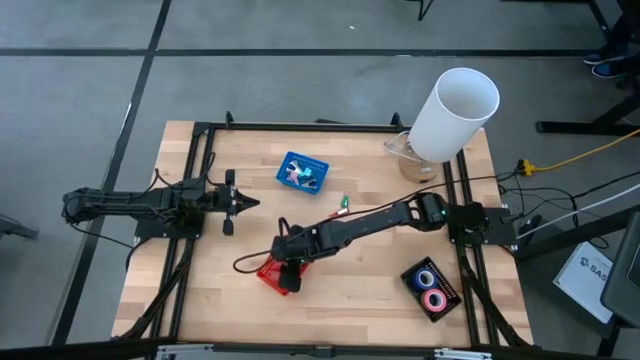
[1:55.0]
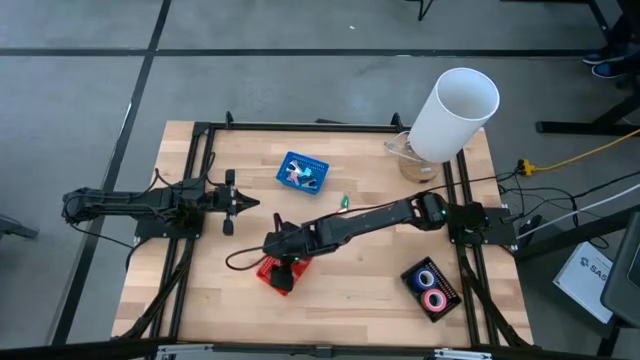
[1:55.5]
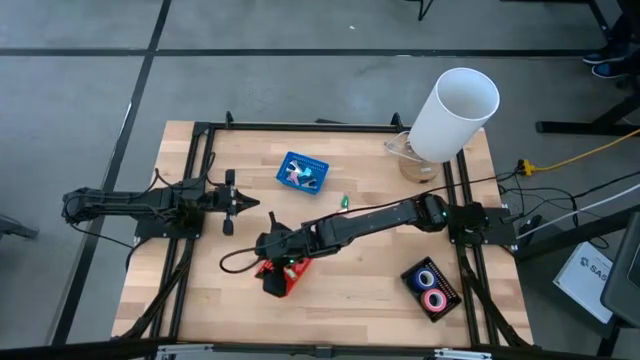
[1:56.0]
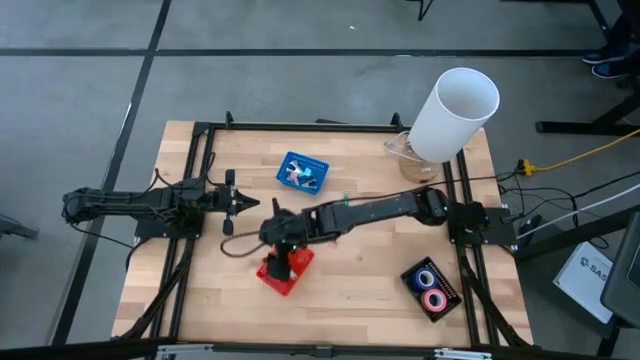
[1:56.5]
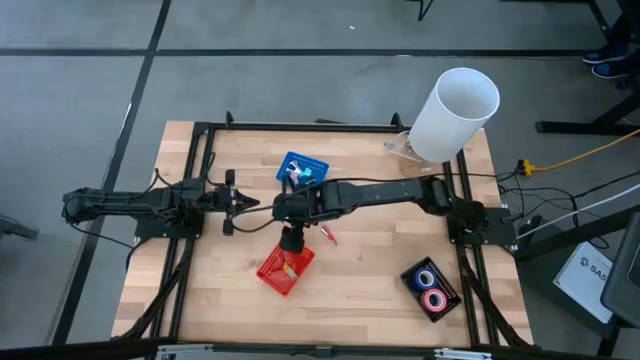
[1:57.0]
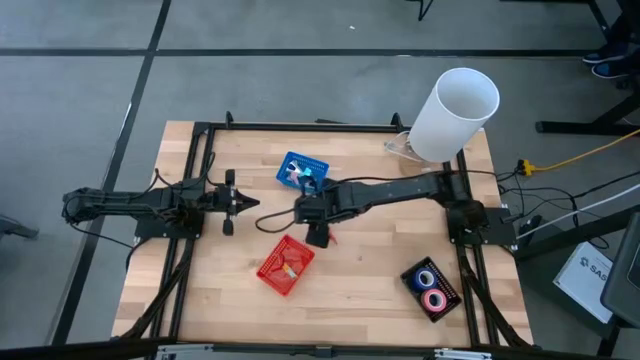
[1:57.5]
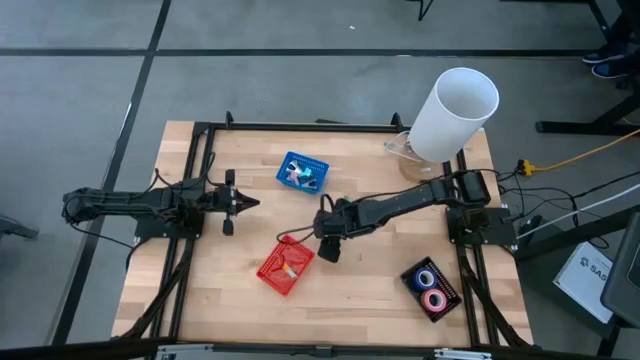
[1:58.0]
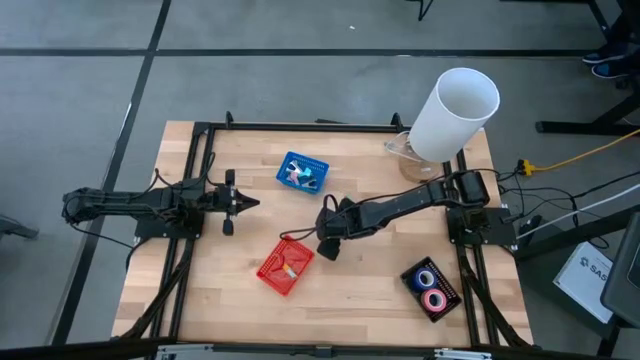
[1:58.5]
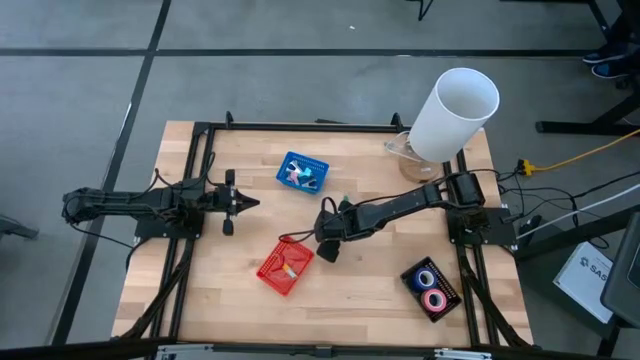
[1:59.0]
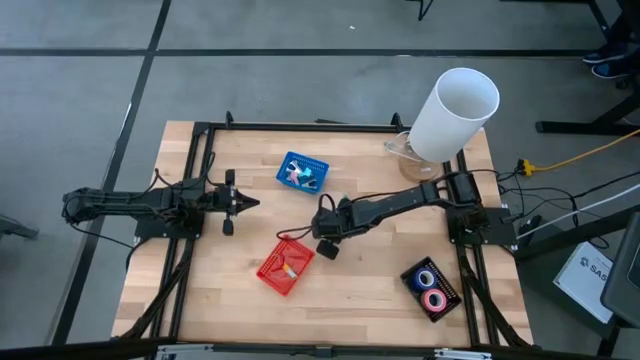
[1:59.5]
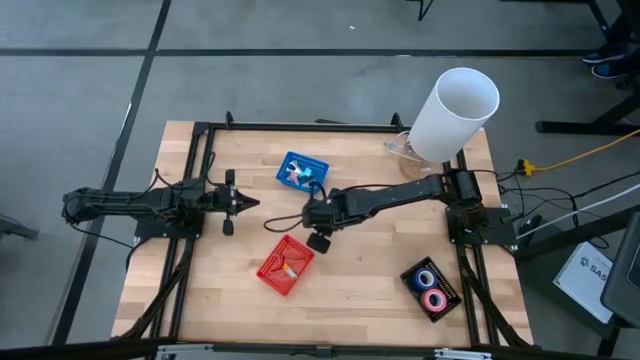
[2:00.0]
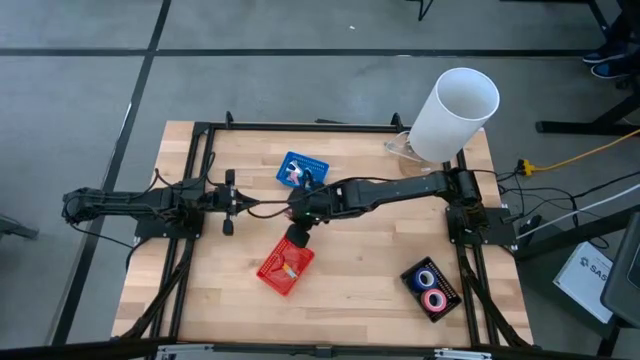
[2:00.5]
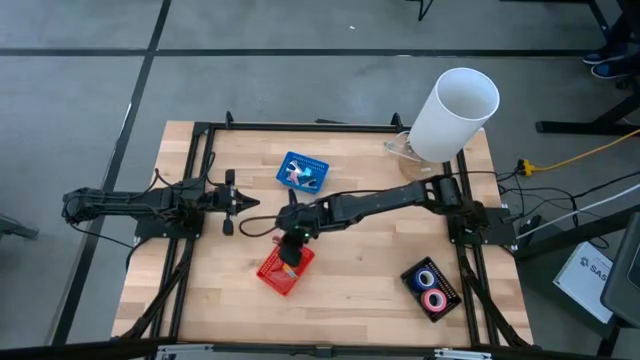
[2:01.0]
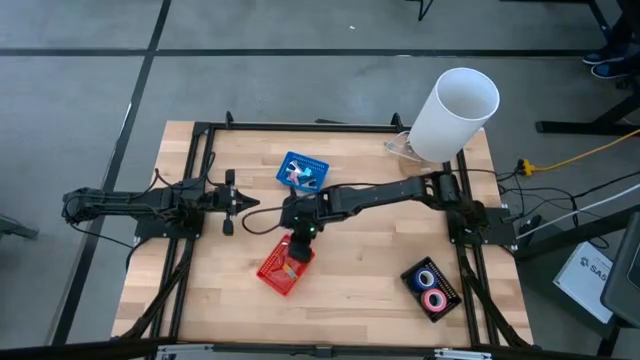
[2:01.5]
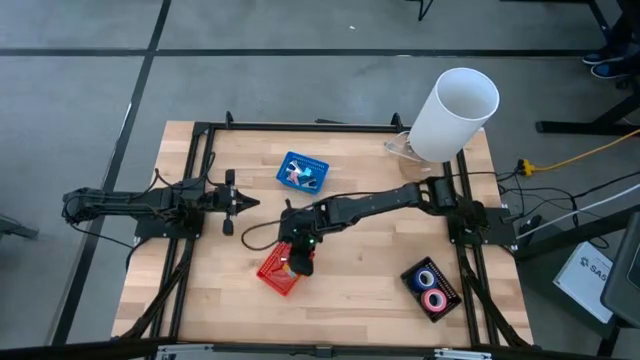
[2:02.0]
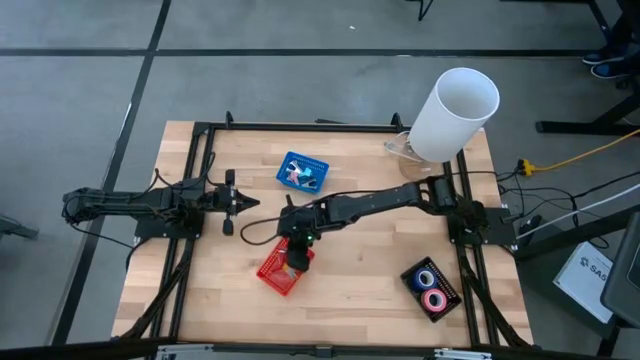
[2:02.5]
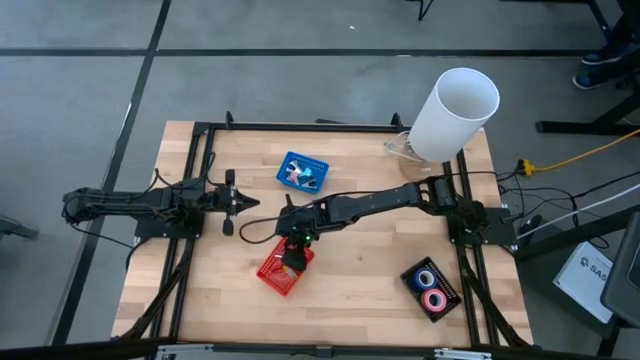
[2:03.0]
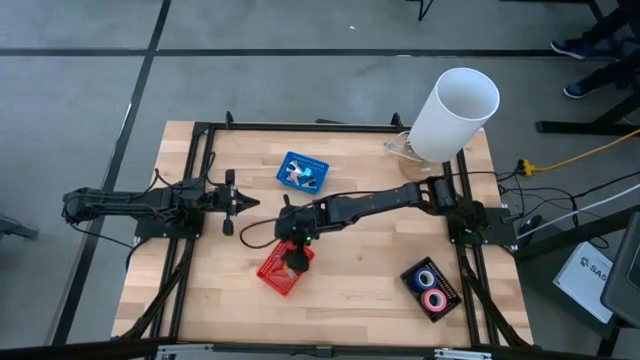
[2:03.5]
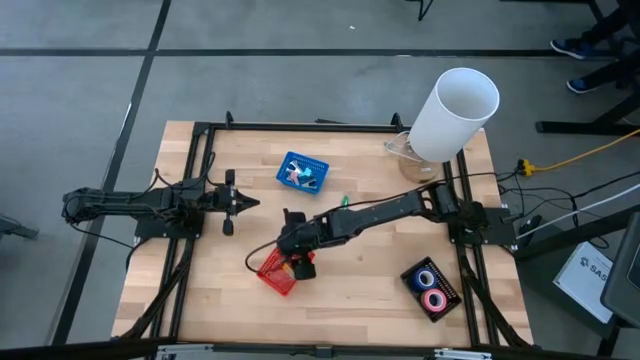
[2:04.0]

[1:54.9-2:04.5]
Task: Pick and place Stapler, Stapler remover, tape
Put the red stapler into the red bin

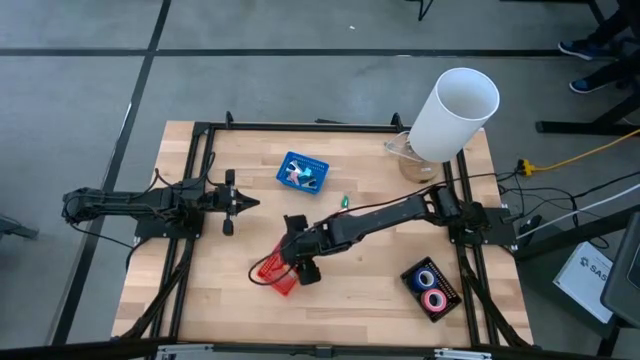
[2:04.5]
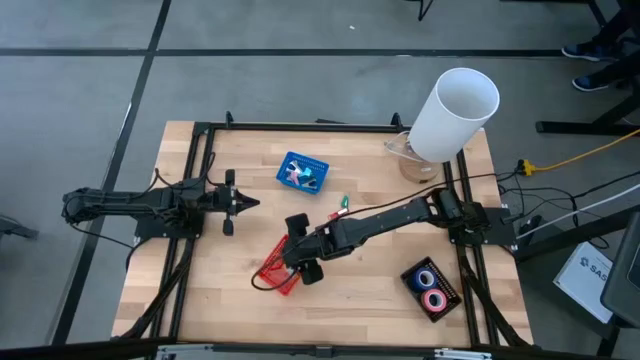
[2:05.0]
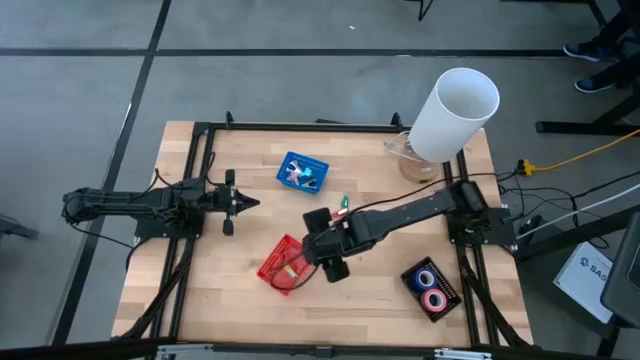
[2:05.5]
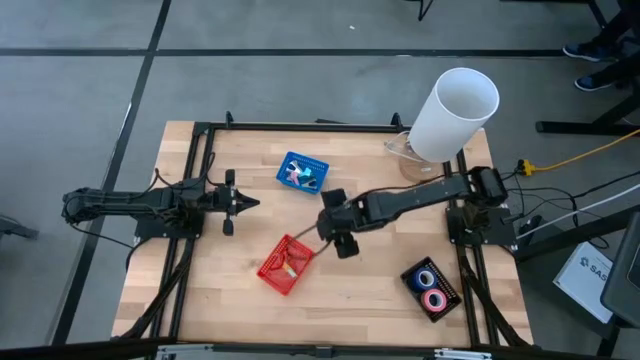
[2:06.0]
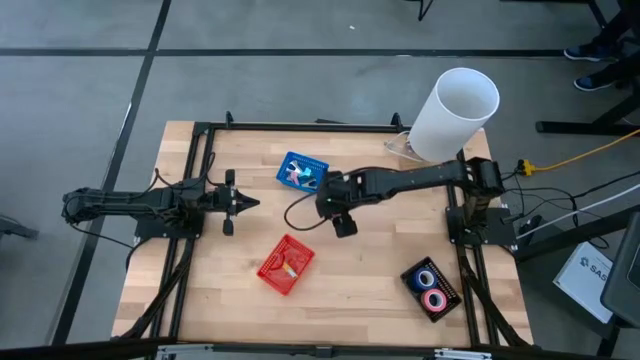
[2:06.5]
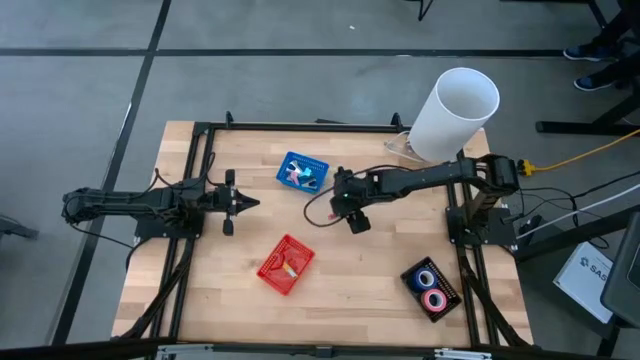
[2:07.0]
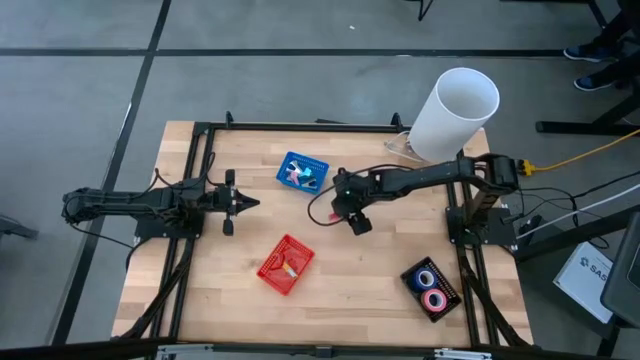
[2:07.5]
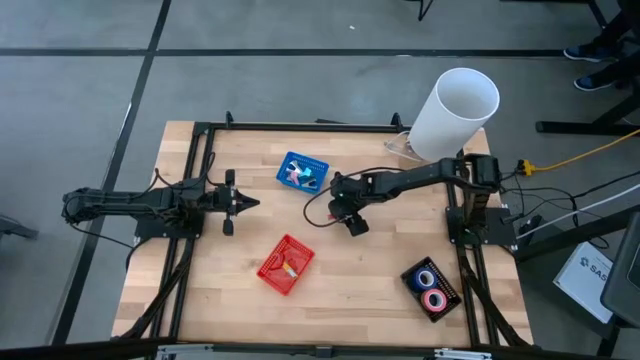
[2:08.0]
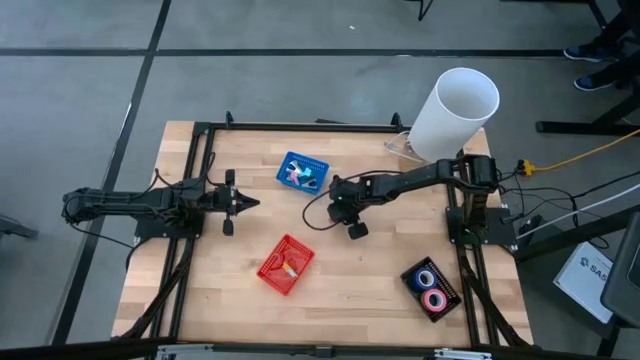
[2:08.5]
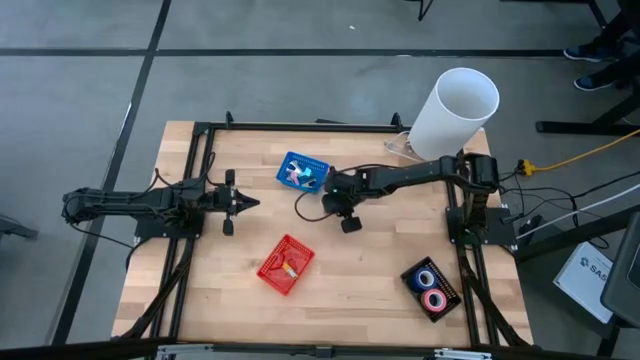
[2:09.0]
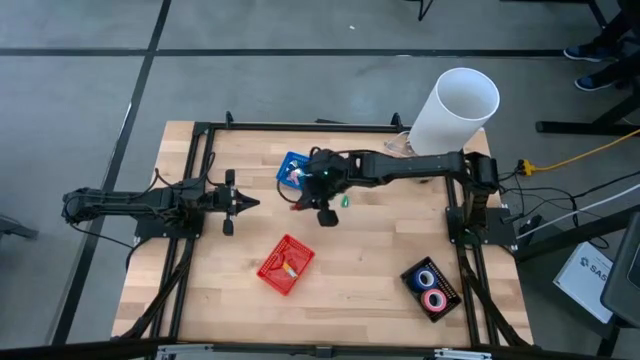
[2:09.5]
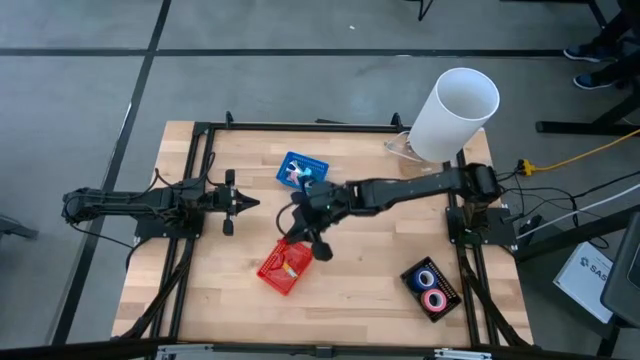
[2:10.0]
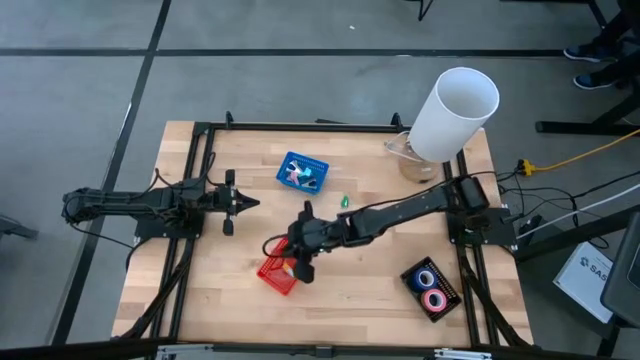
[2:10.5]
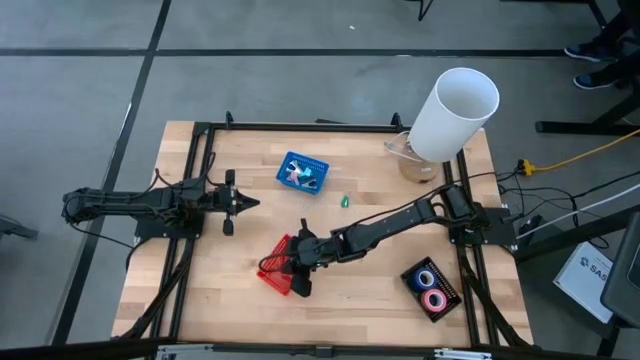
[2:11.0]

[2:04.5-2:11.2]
Put the red stapler into the red bin

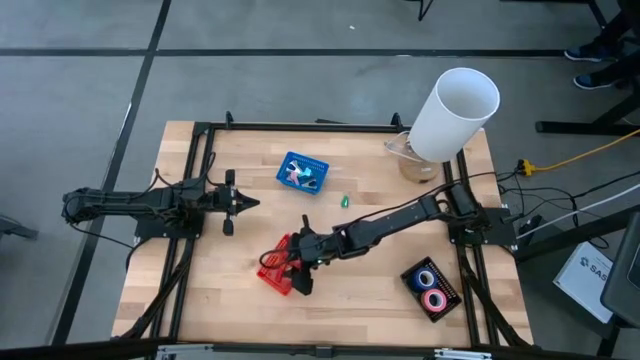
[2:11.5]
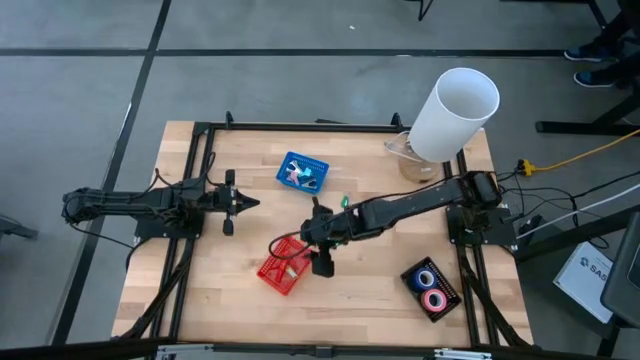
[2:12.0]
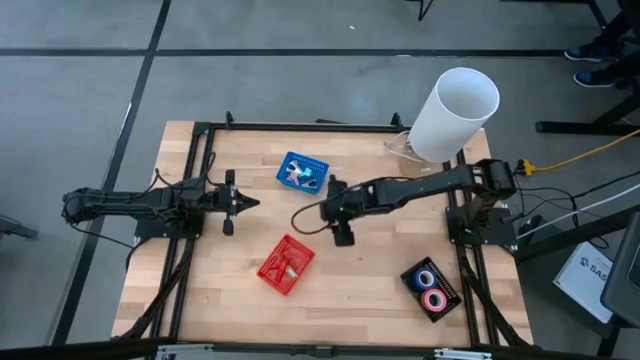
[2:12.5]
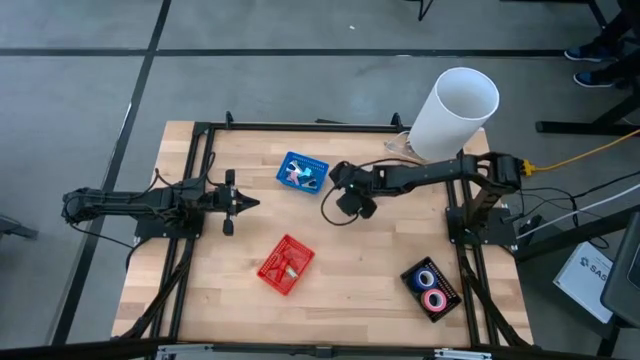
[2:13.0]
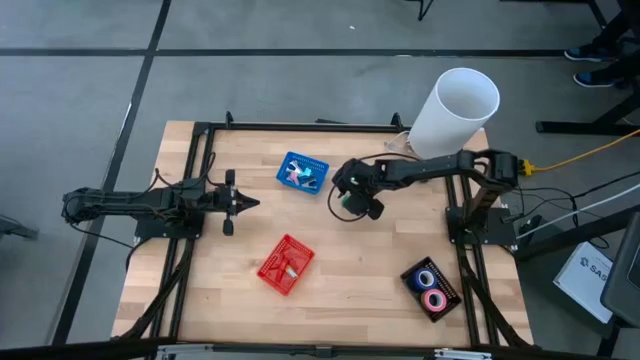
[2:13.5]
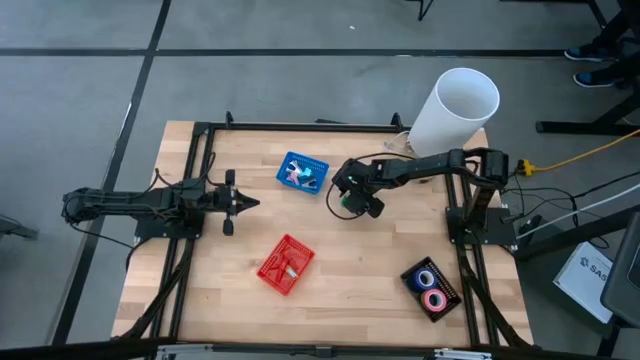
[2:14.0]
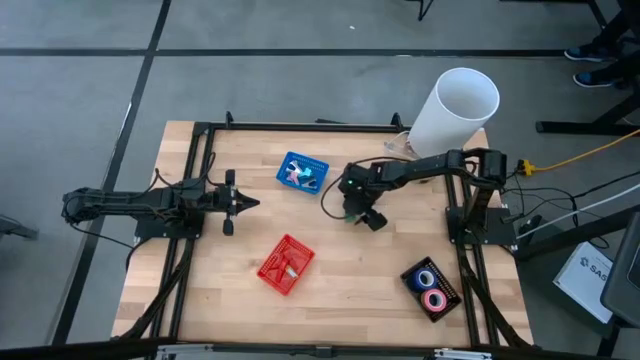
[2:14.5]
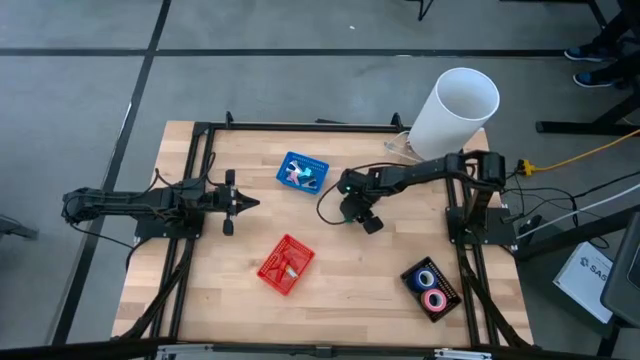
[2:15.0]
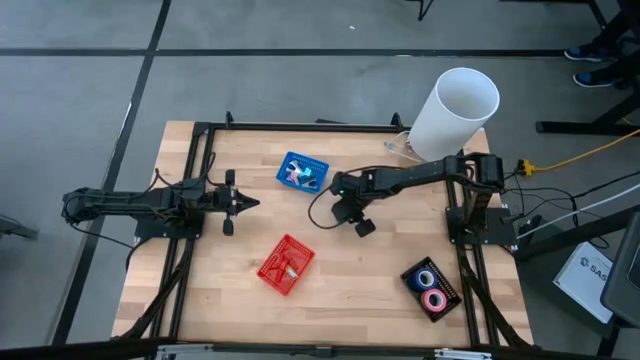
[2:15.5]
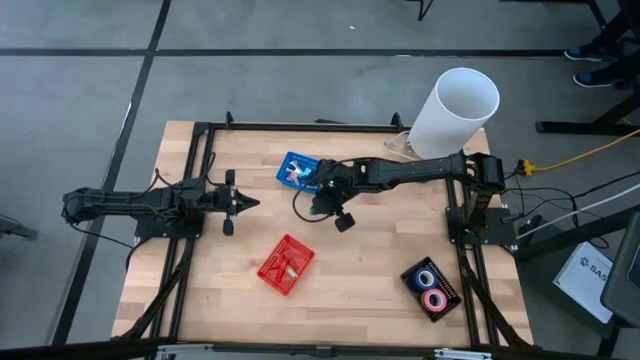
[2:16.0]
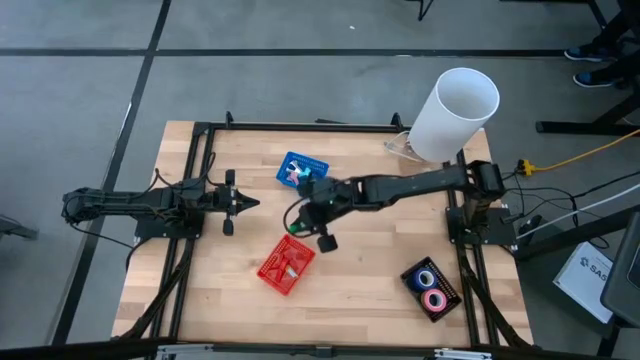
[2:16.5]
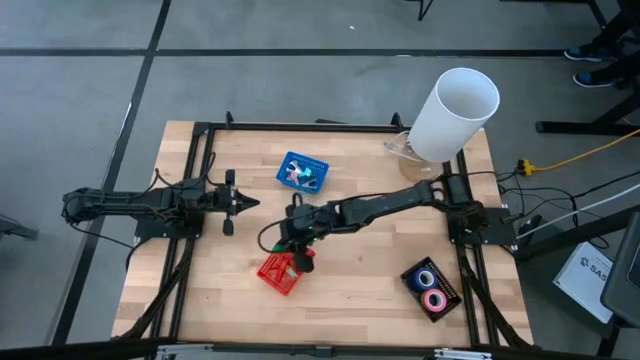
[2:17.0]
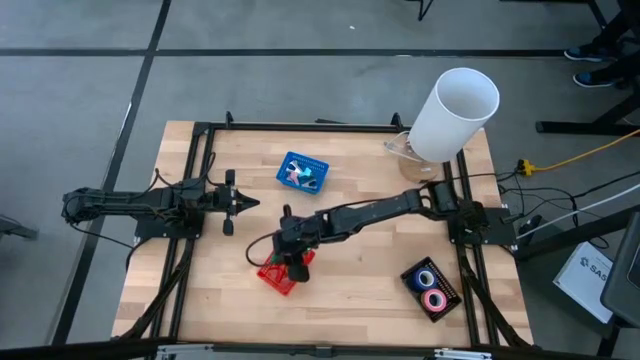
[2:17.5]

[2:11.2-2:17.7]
Put the green stapler into the red bin

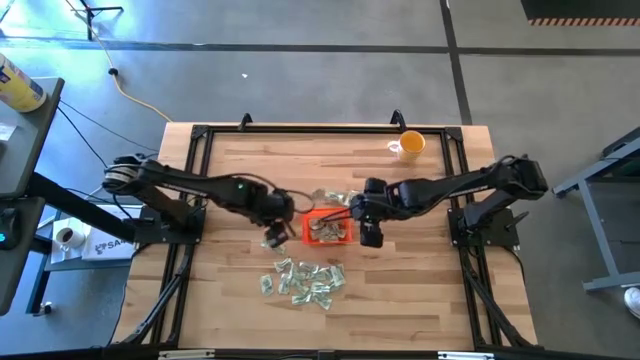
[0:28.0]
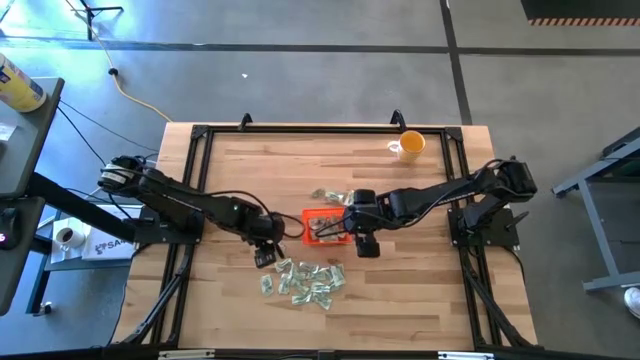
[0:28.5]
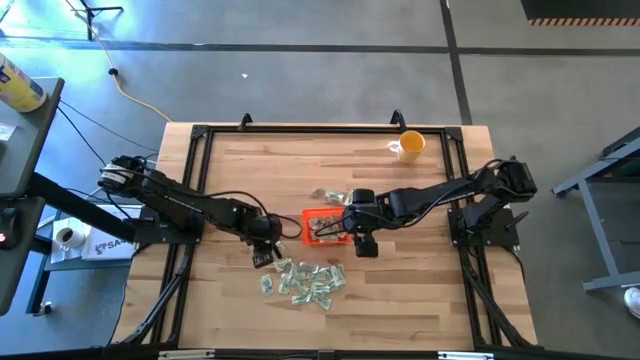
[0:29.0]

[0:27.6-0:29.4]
Task: Pick and place Stevia / Truvia into bins
Put the stevia packet into the orange bin
